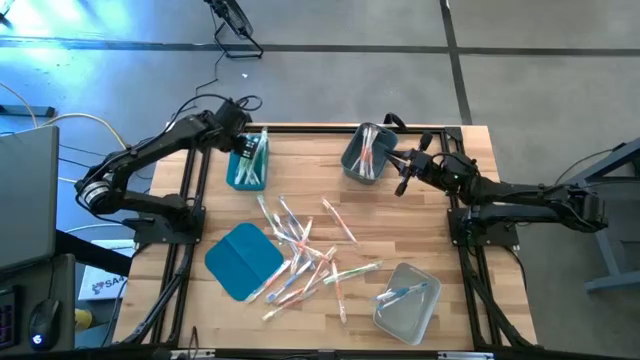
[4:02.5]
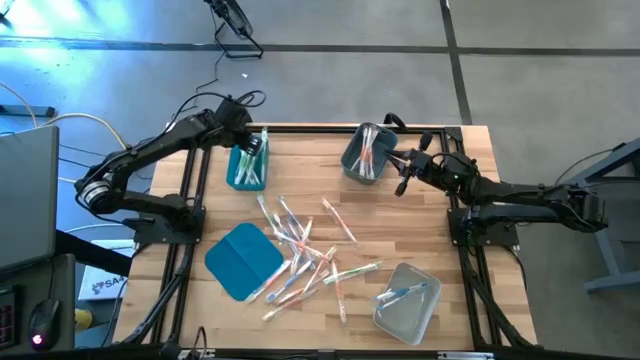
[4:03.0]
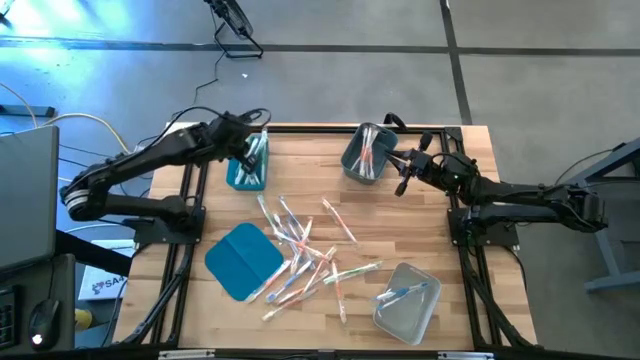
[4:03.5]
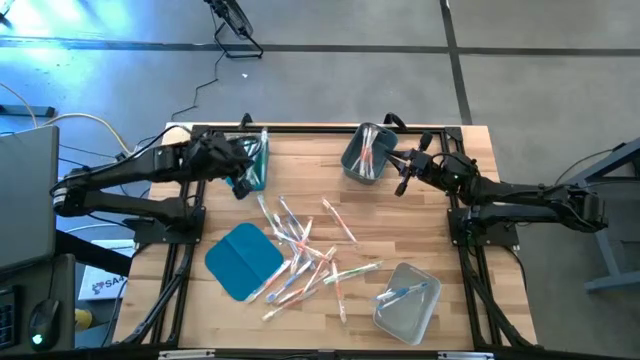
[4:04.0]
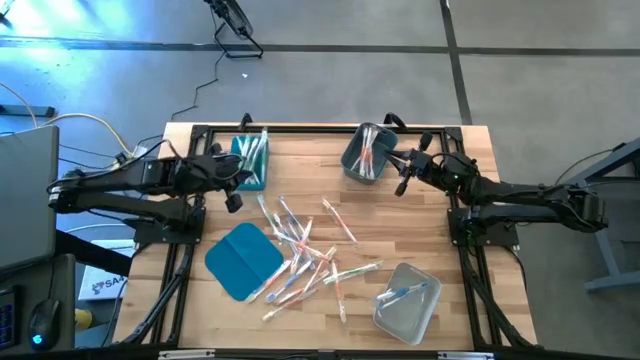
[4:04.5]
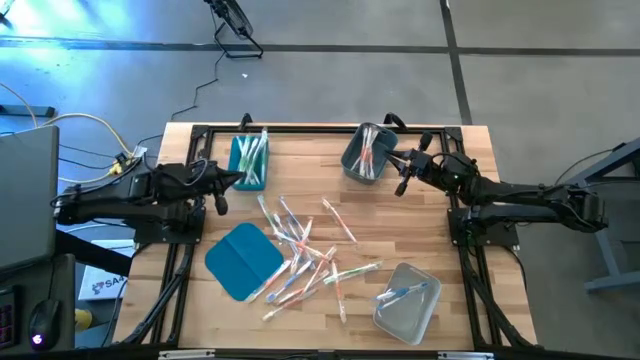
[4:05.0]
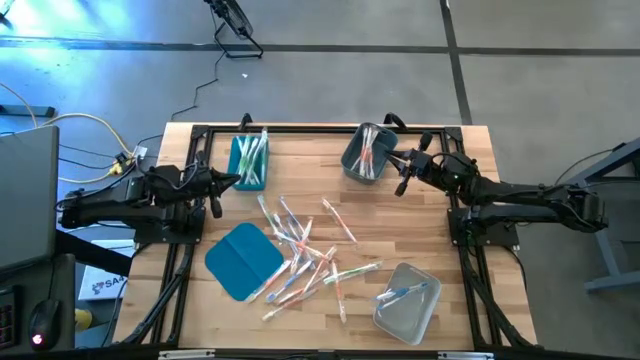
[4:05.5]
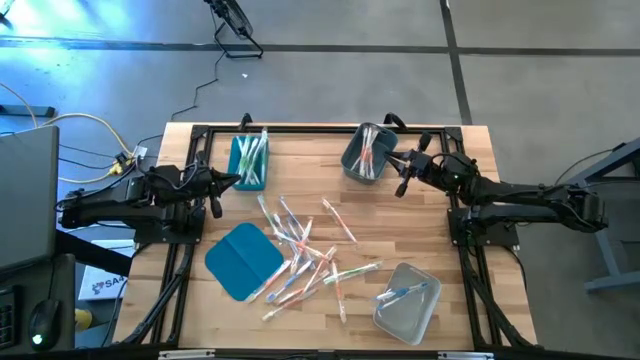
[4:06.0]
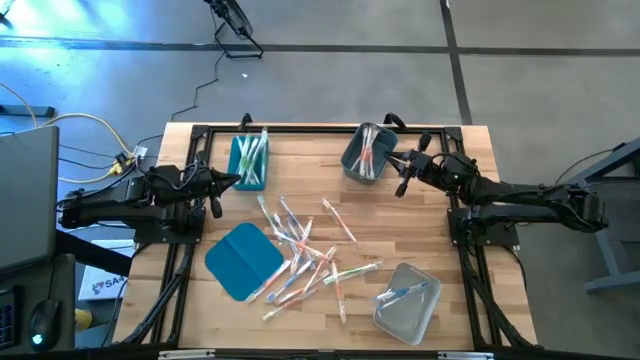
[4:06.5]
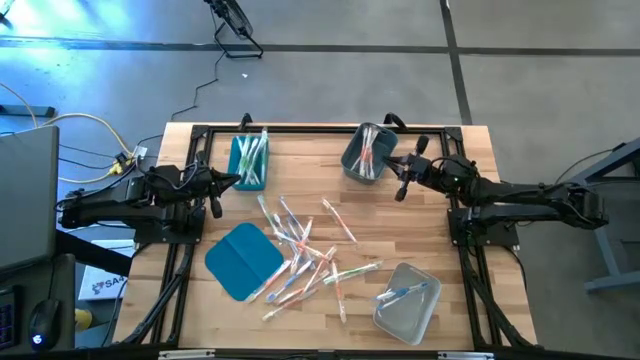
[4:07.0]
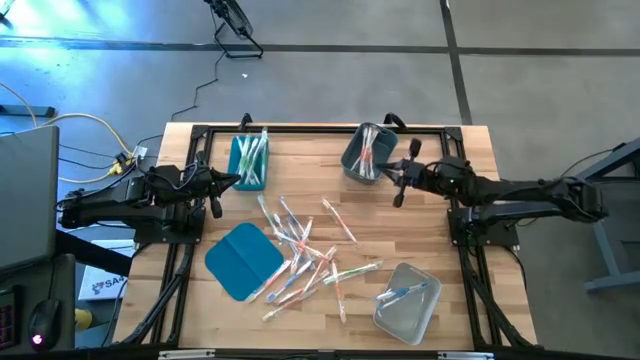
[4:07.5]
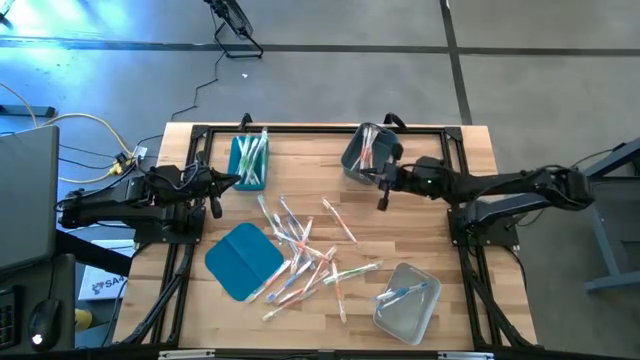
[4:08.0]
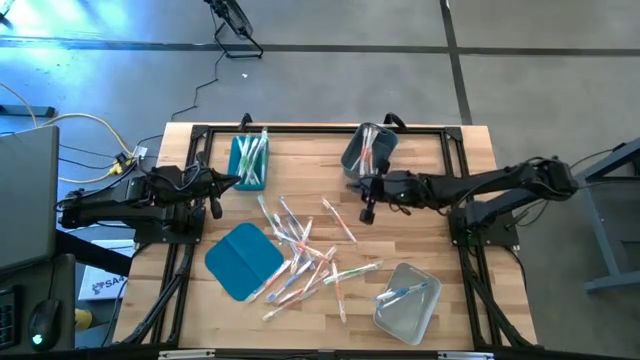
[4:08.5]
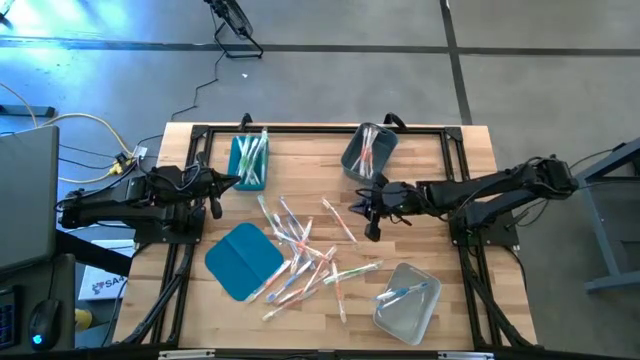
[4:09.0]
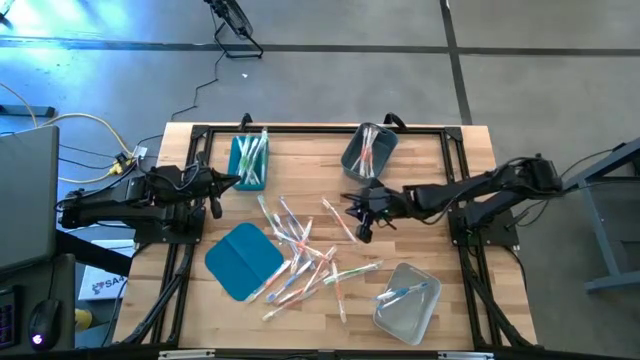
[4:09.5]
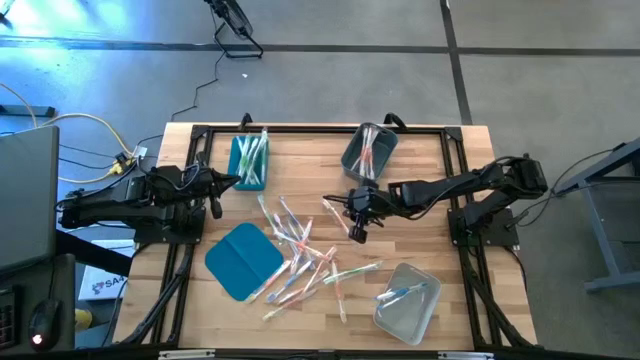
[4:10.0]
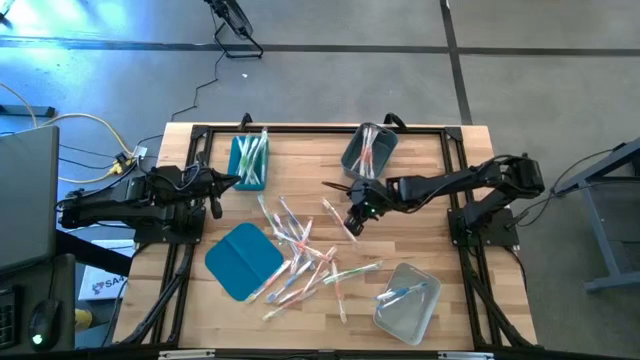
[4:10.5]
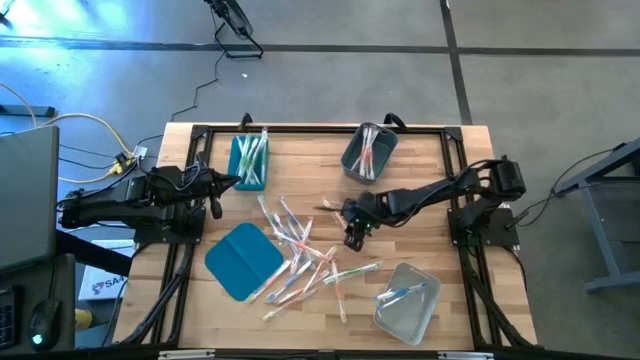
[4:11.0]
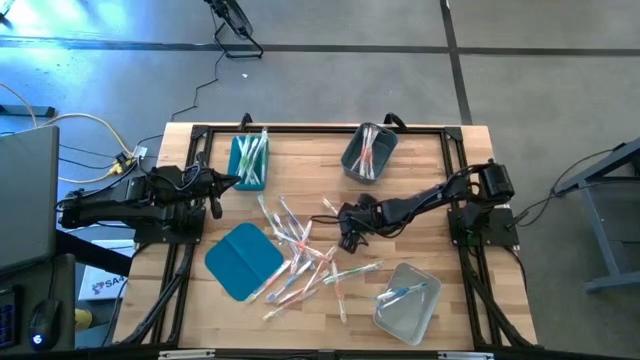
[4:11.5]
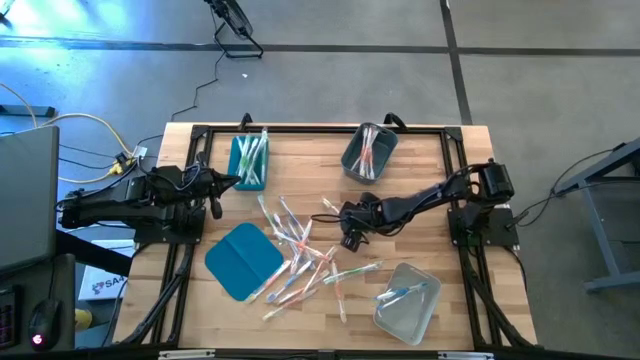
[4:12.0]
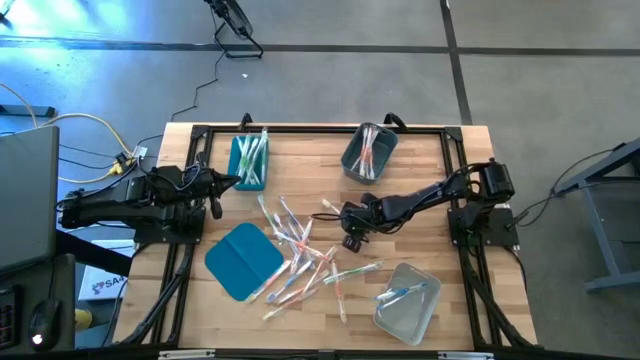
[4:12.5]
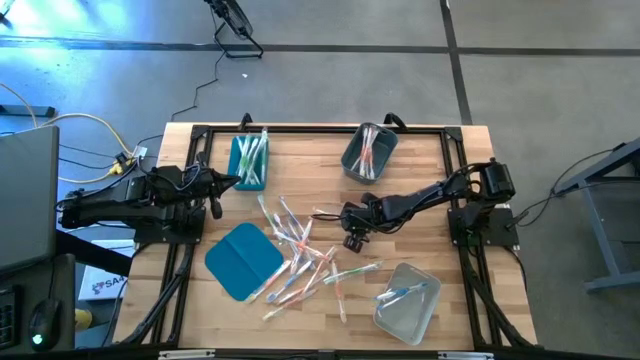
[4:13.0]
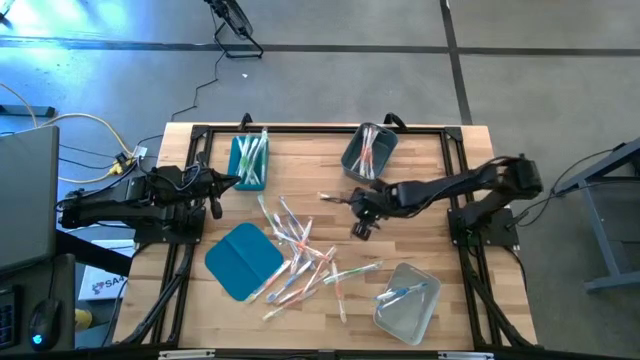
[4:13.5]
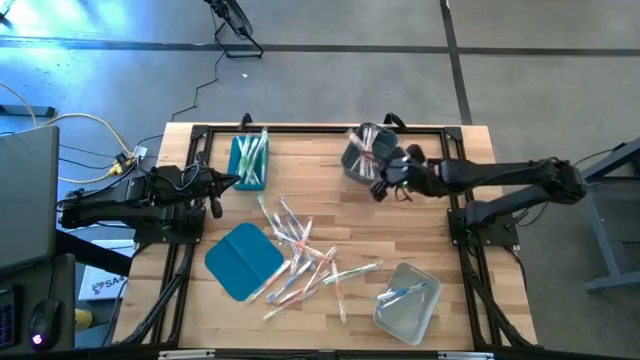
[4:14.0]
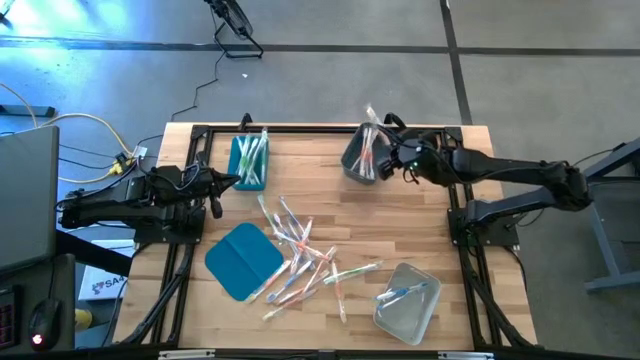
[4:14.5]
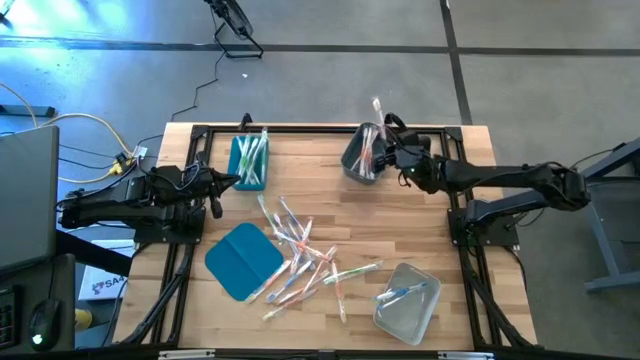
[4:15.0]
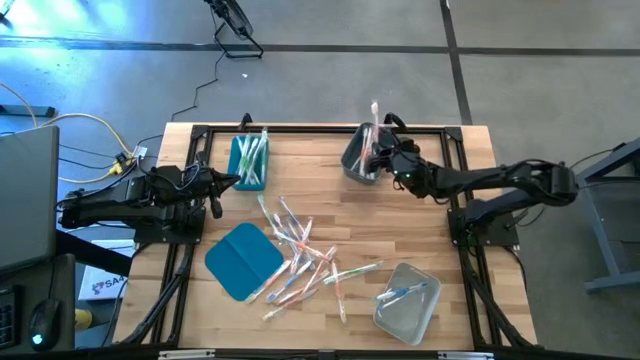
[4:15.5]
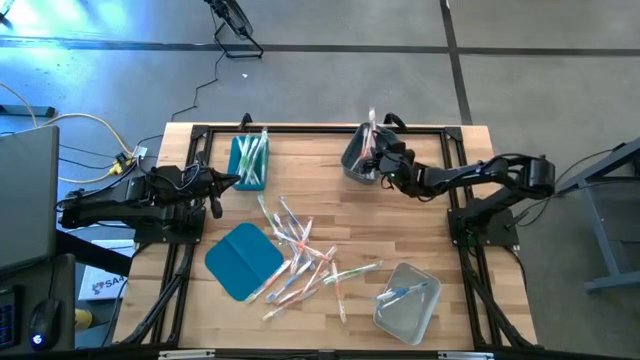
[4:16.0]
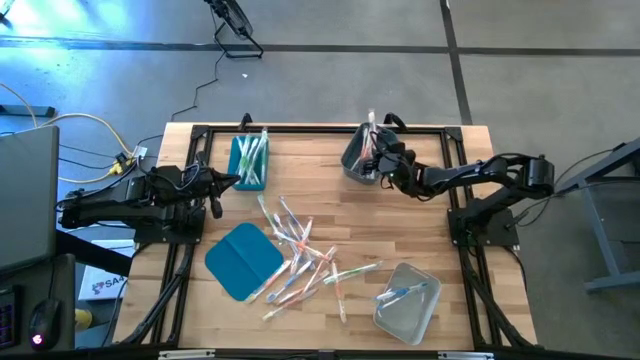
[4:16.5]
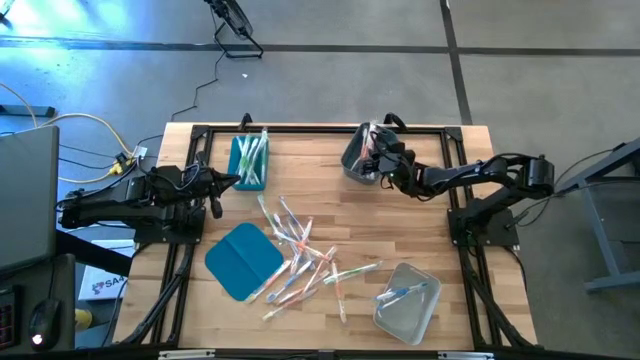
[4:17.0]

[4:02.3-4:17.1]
Task: Pick & Place Toothbrushes
Put the orange toothbrush into the dark gray bin
